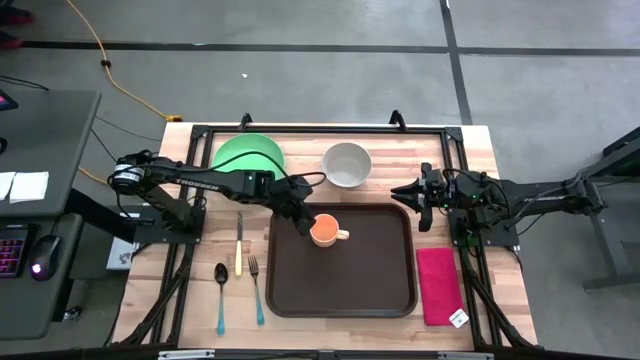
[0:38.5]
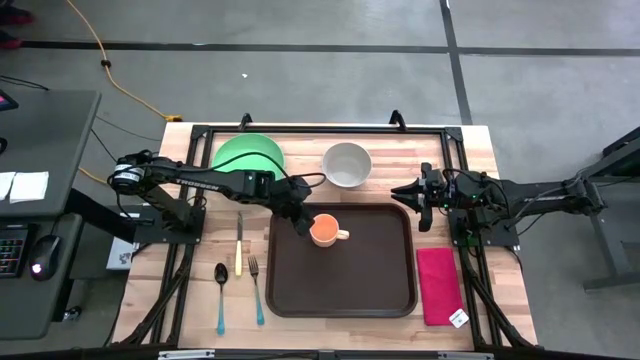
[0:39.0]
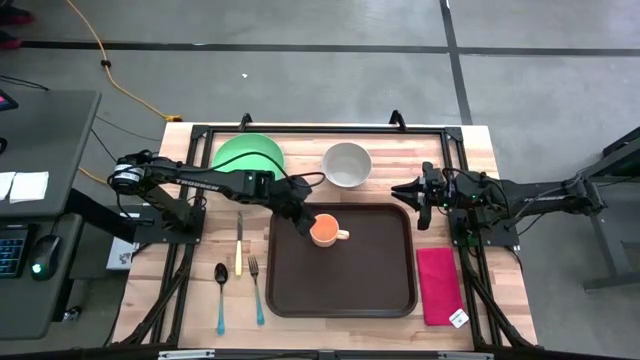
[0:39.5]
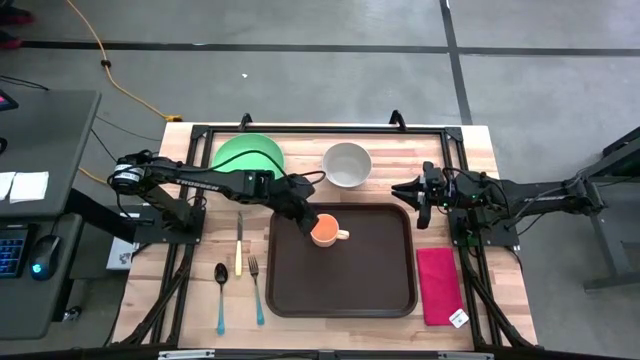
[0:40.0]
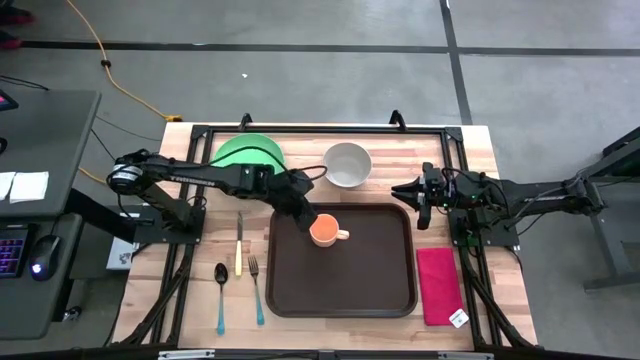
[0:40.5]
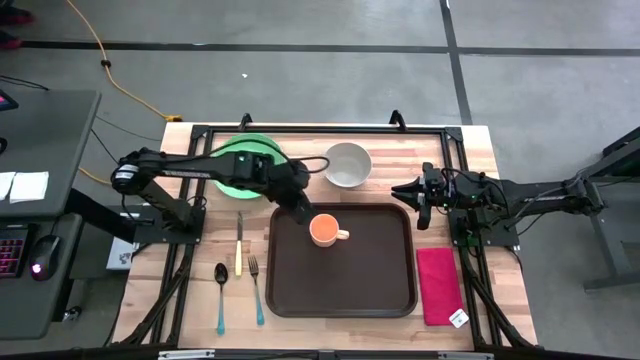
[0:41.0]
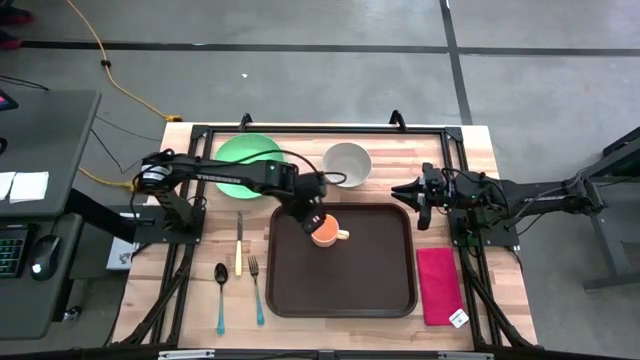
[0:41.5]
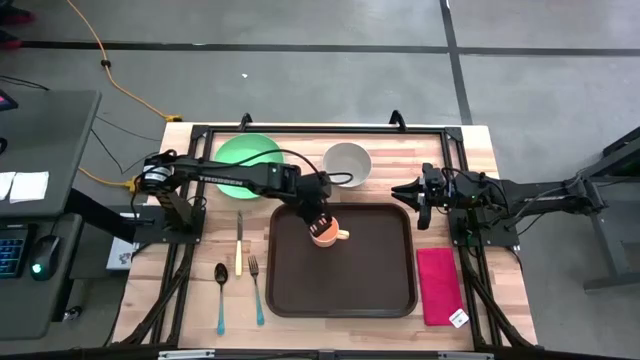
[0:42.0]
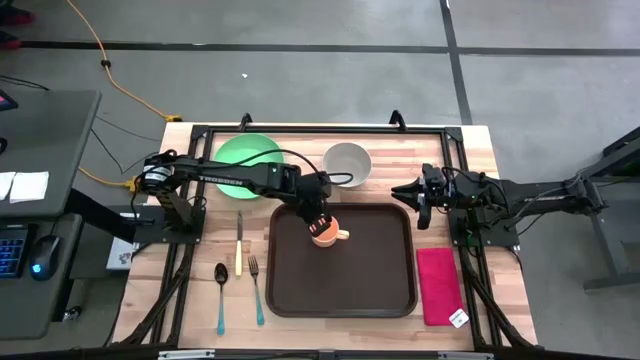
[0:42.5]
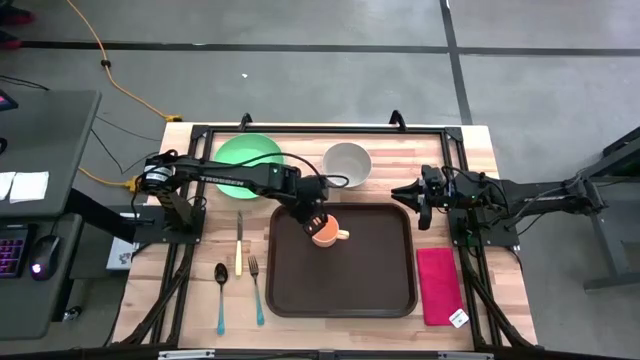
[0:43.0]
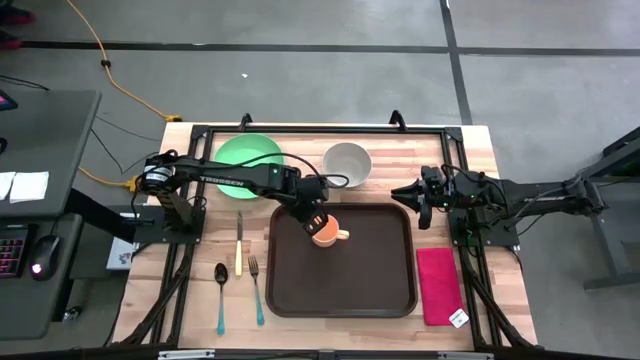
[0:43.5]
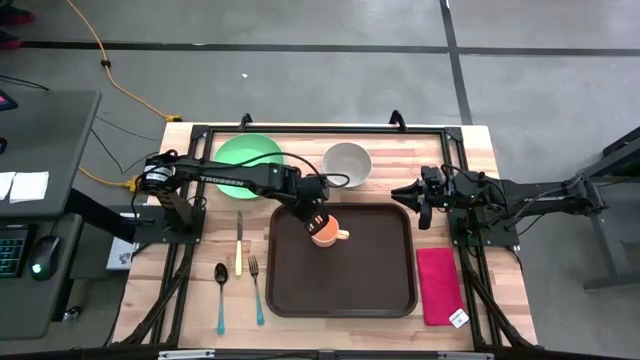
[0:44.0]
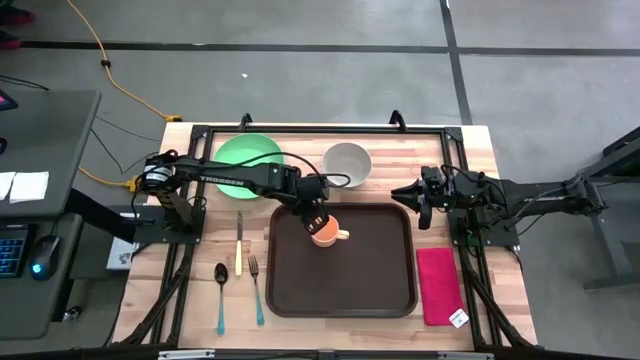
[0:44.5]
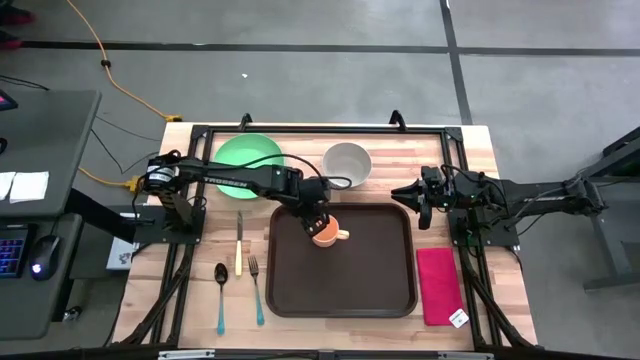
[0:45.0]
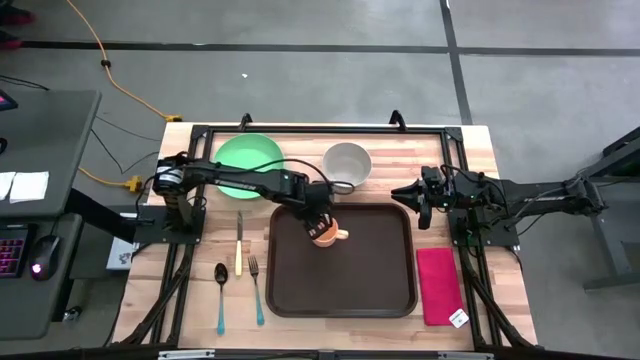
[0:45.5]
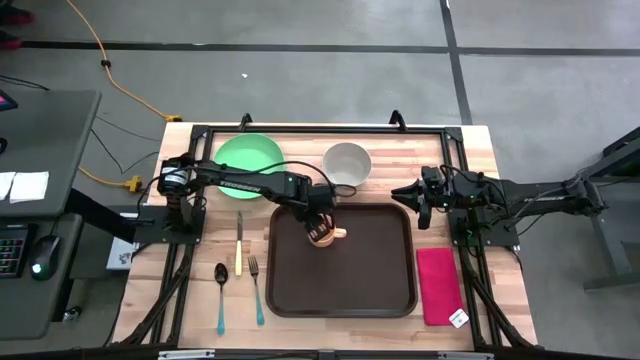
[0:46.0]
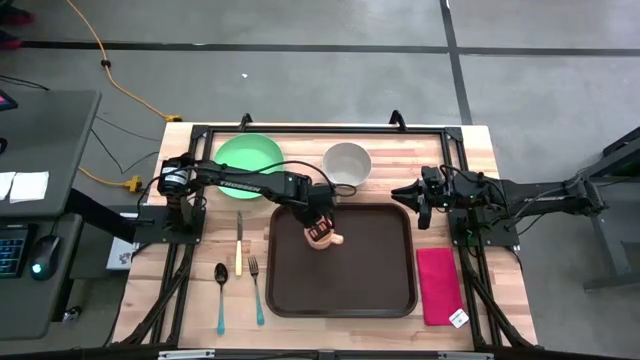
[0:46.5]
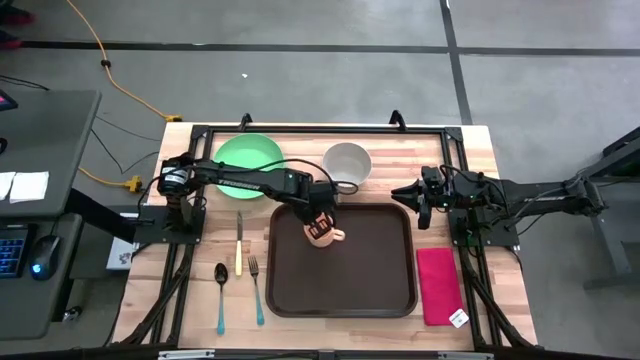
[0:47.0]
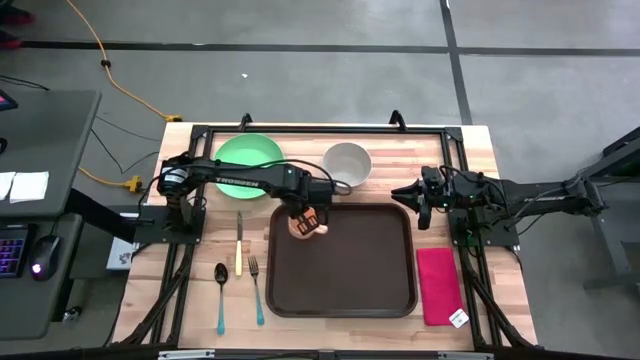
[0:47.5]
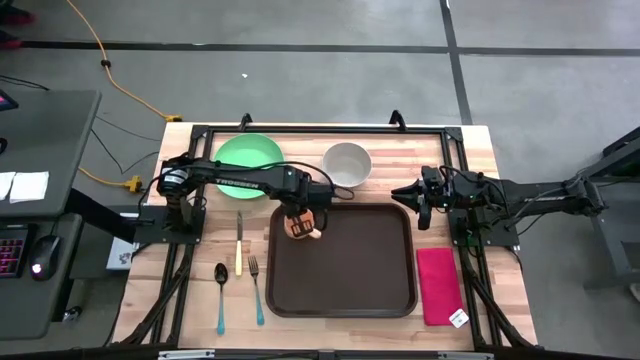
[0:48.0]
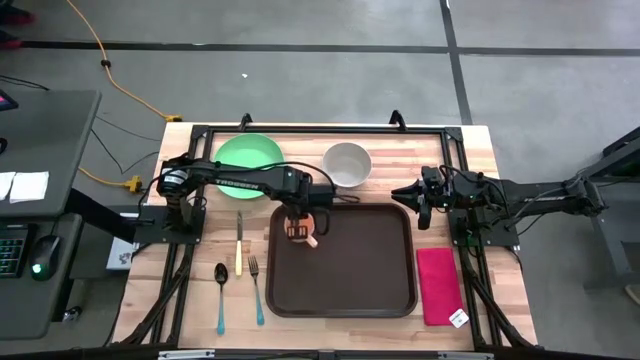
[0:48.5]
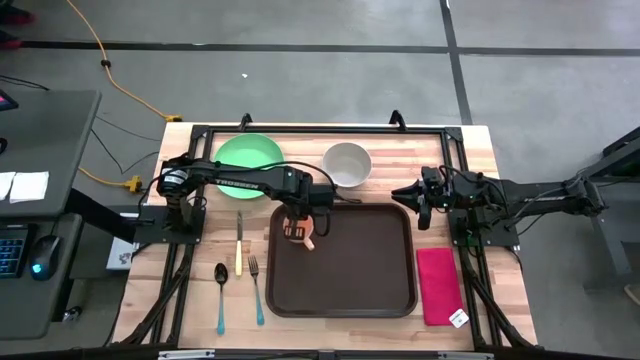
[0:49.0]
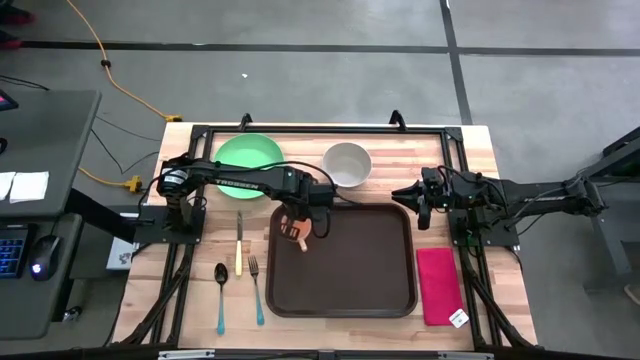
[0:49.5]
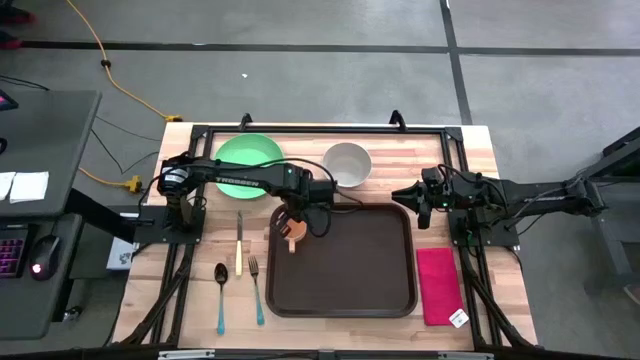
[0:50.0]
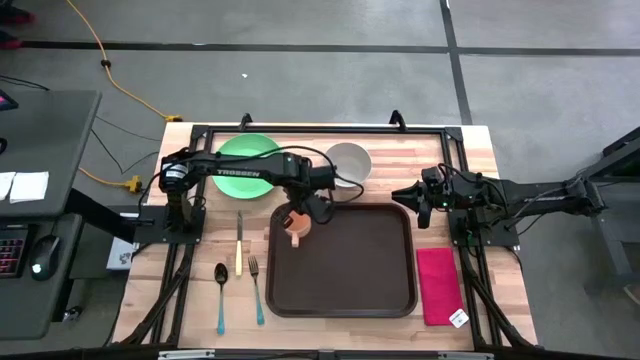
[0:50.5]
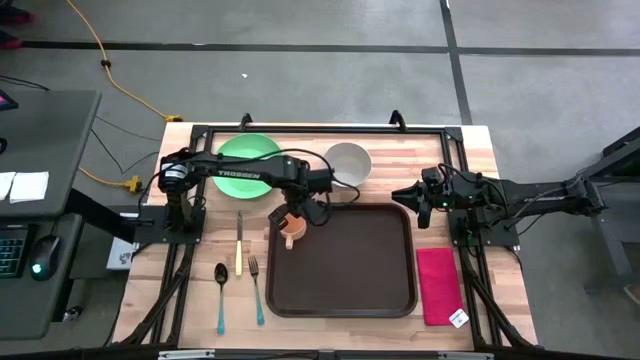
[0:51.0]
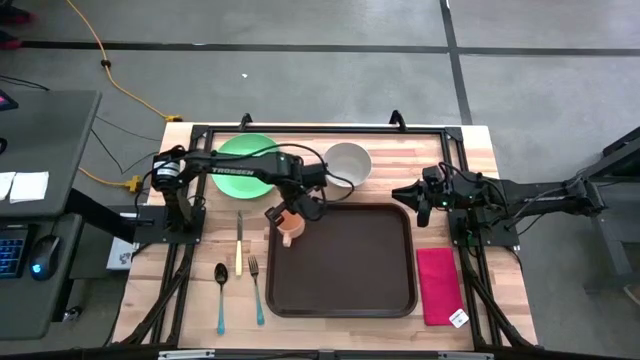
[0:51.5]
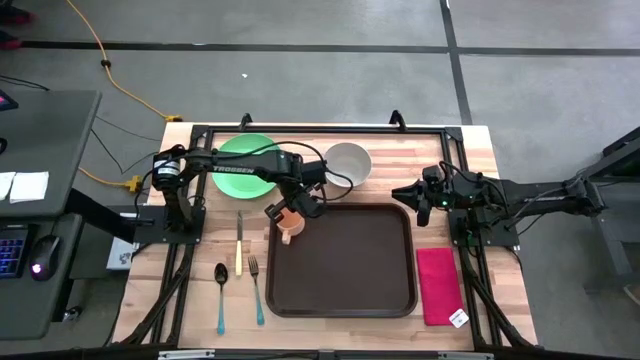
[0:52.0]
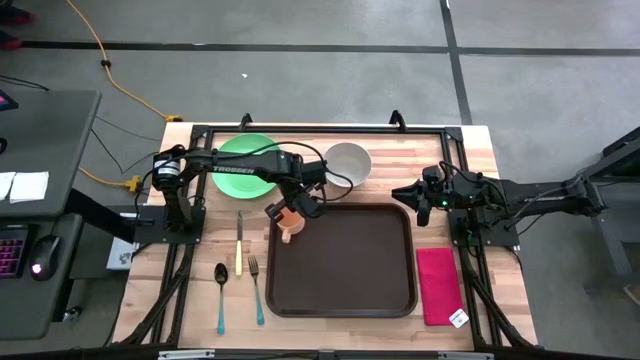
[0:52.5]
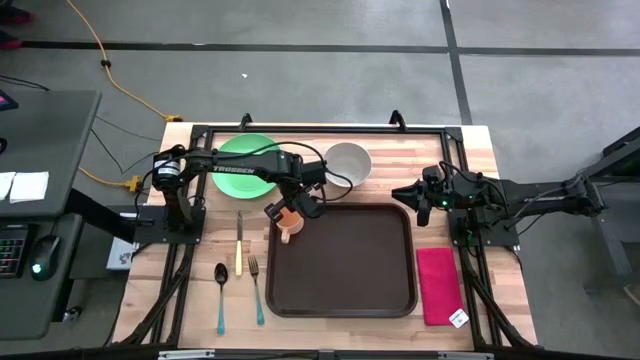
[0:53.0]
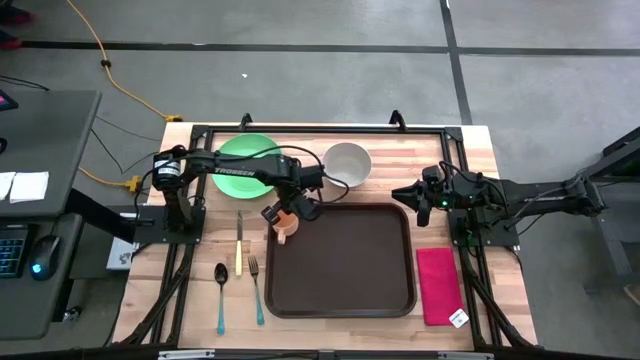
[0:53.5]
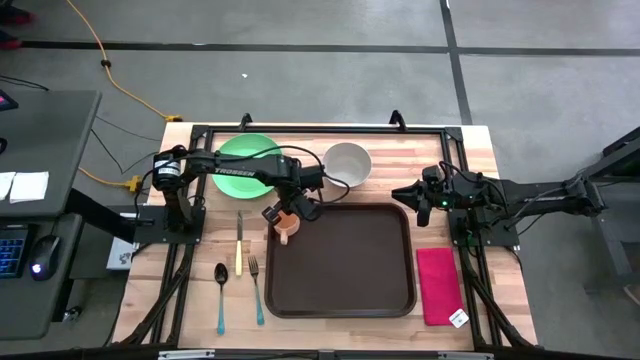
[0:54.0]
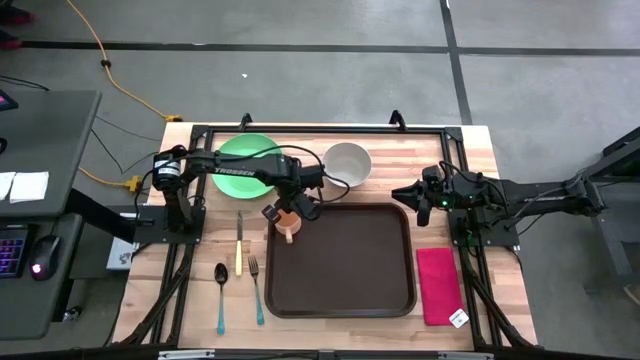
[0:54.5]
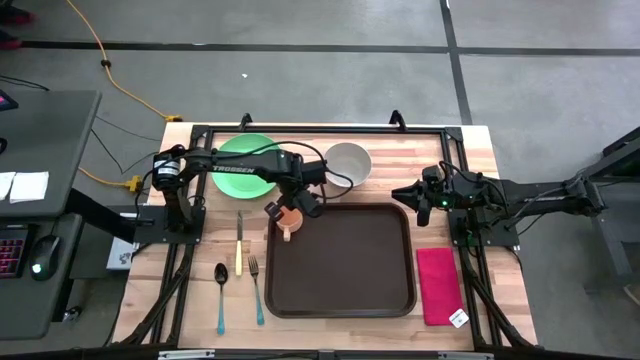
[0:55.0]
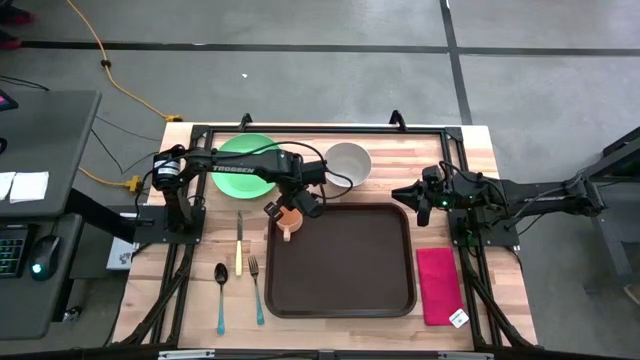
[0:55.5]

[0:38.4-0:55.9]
Task: Set up tray
Put the yellow mug on the brown tray

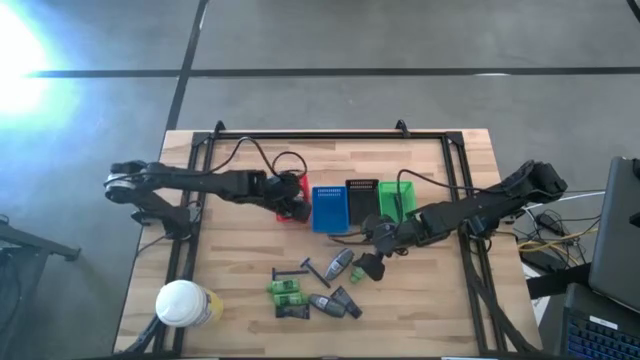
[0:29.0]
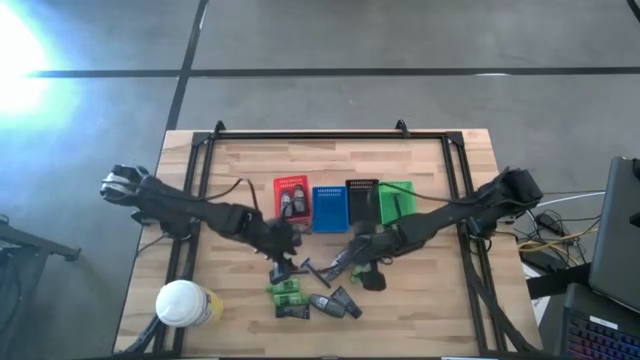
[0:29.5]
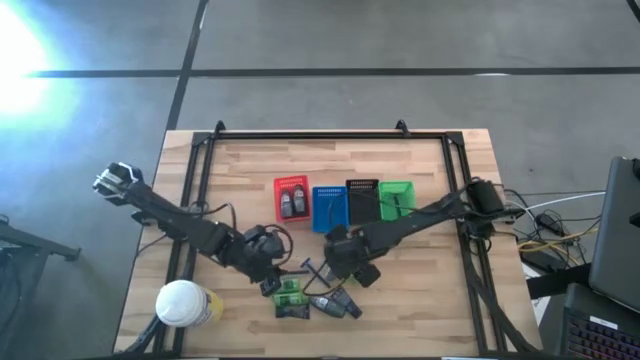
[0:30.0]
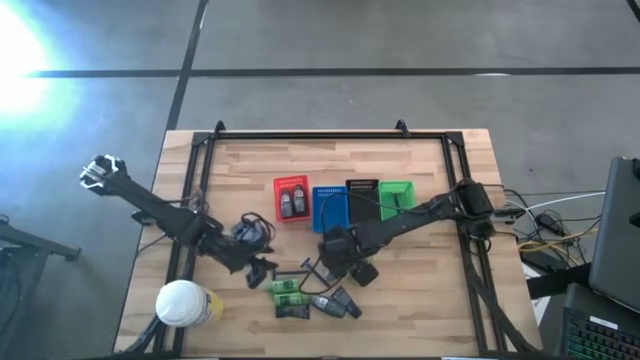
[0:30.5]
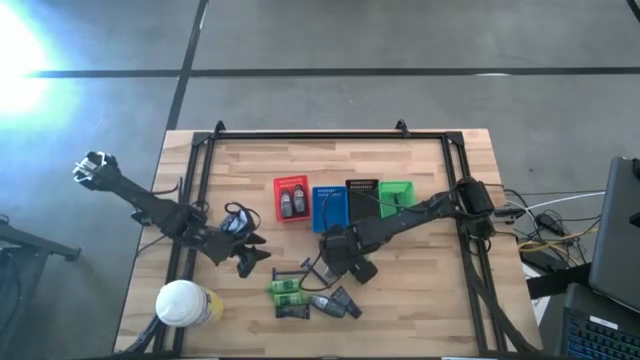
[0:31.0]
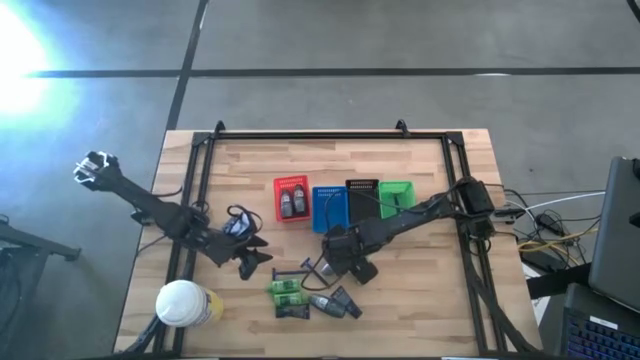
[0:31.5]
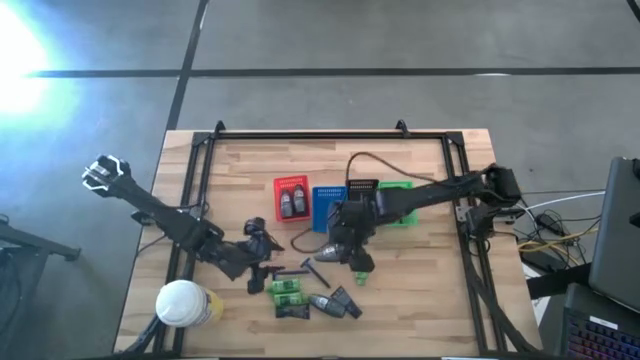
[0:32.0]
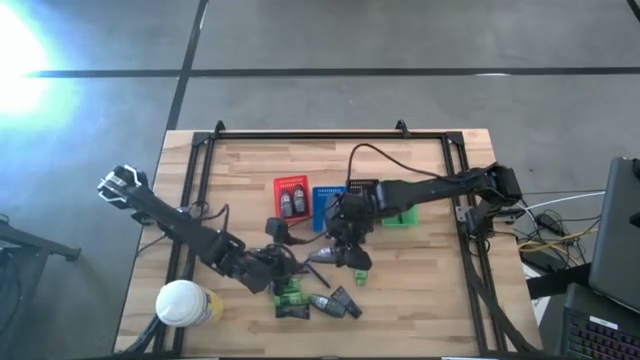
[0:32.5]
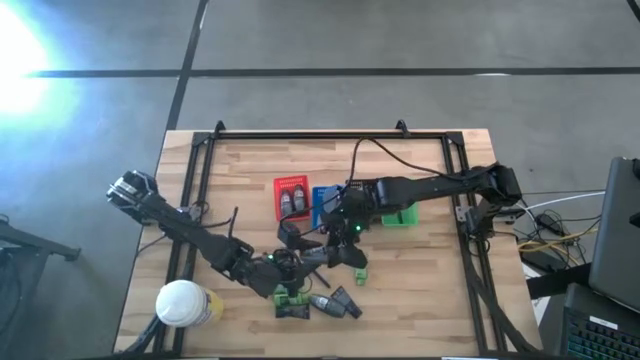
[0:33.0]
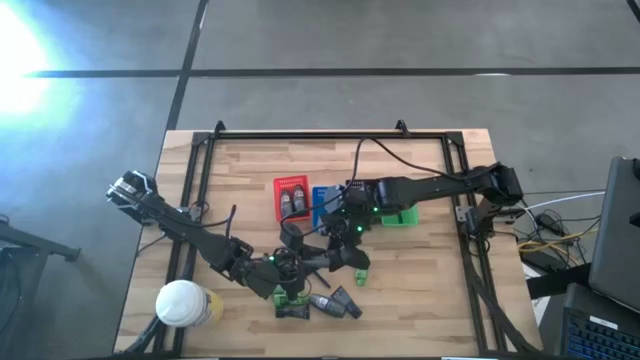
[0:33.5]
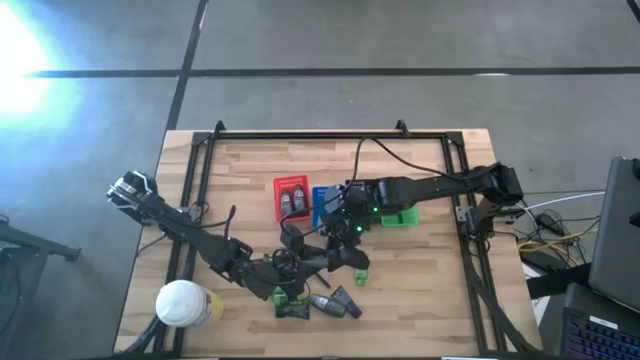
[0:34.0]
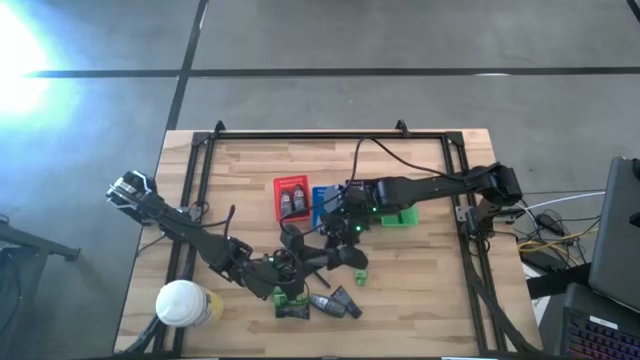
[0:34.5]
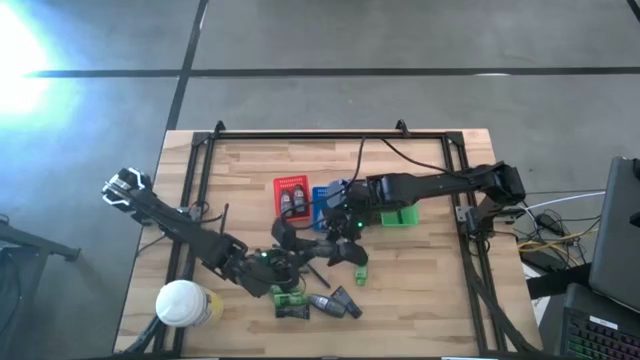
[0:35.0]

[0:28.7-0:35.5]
Task: Pick & Place Travel size toiletries
Put the gray deodorant into the red bin
